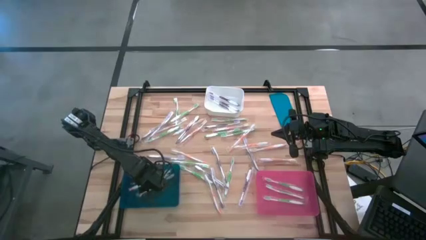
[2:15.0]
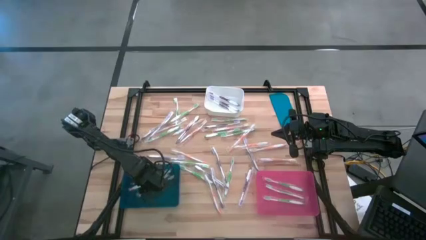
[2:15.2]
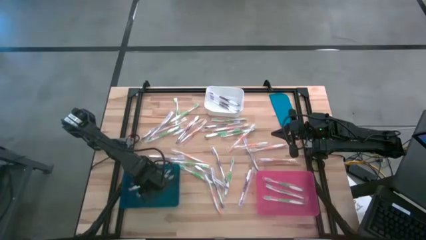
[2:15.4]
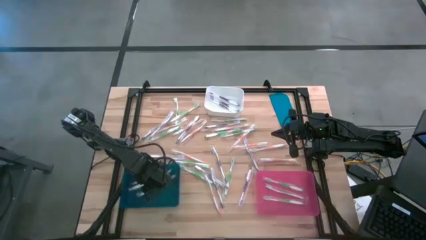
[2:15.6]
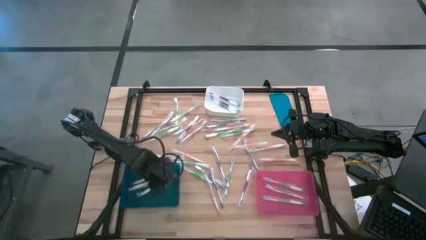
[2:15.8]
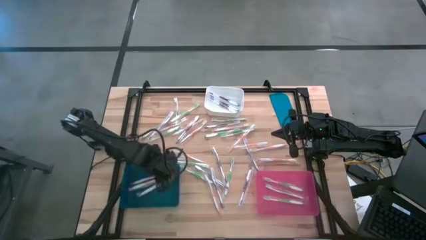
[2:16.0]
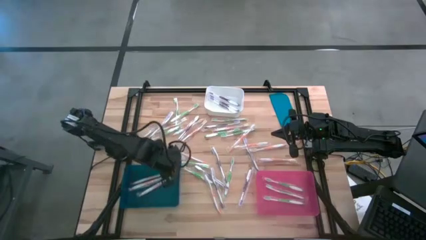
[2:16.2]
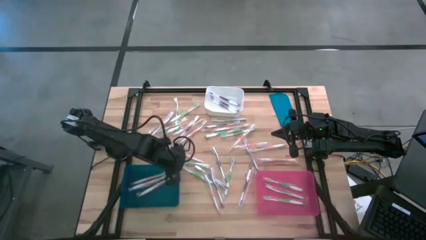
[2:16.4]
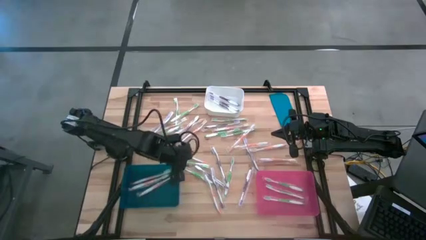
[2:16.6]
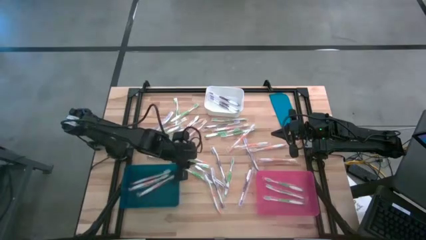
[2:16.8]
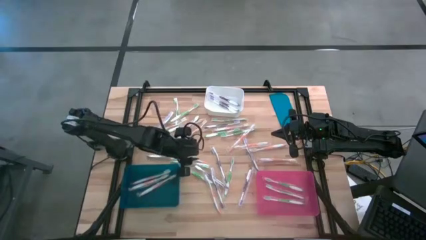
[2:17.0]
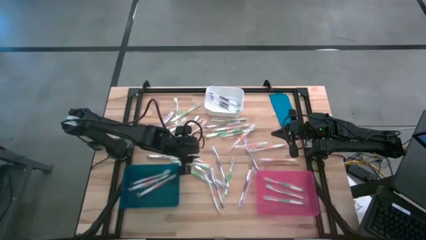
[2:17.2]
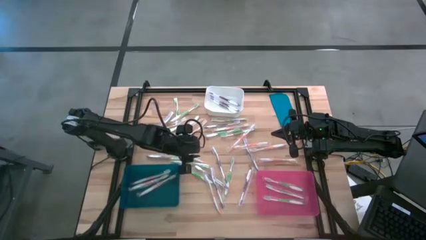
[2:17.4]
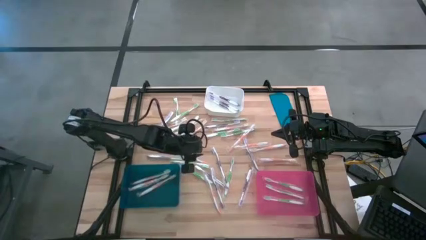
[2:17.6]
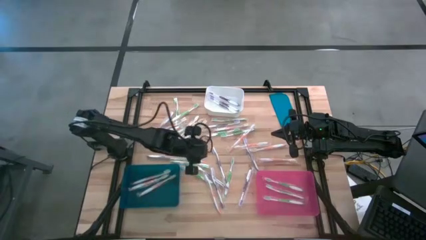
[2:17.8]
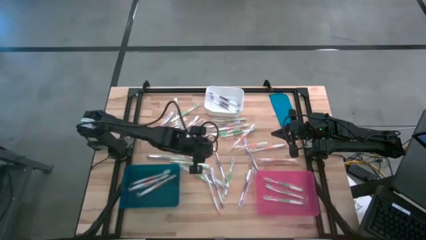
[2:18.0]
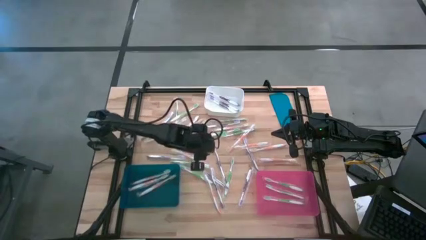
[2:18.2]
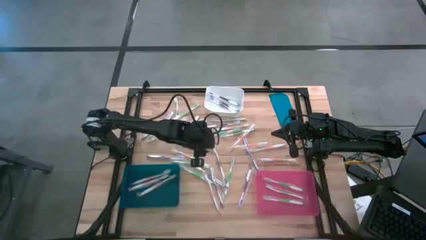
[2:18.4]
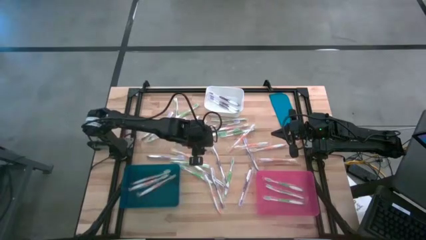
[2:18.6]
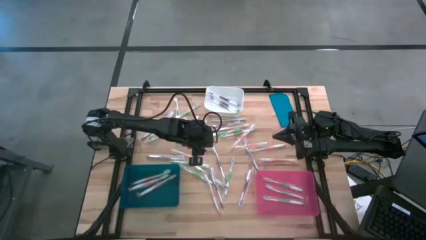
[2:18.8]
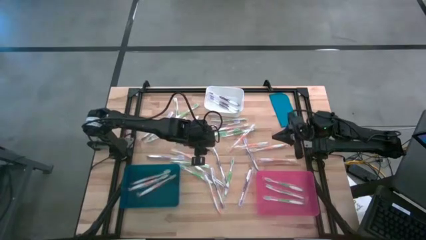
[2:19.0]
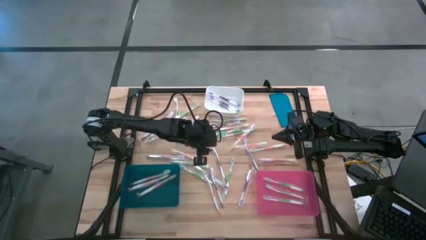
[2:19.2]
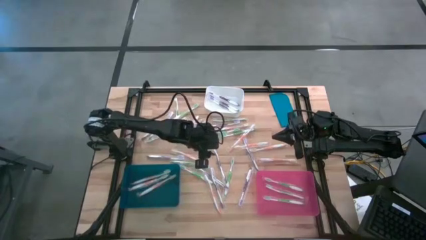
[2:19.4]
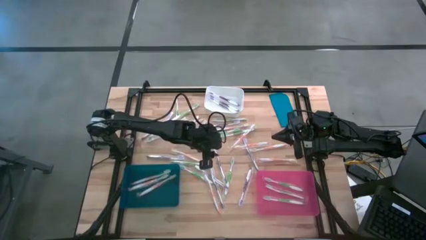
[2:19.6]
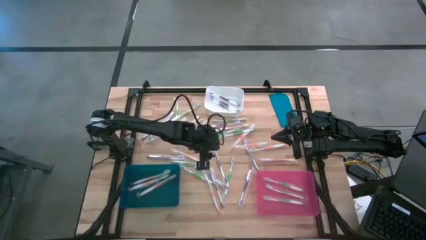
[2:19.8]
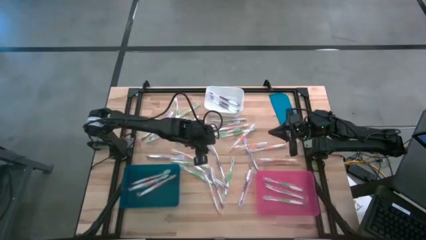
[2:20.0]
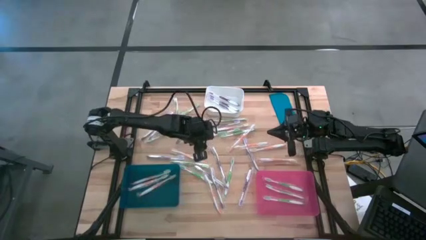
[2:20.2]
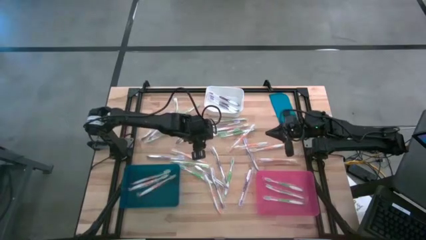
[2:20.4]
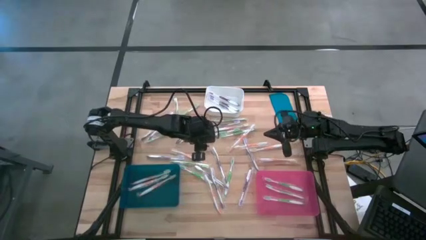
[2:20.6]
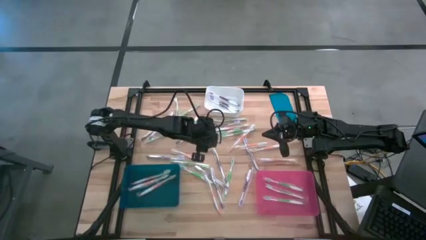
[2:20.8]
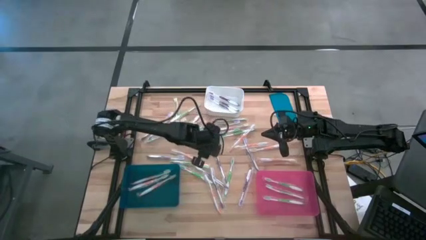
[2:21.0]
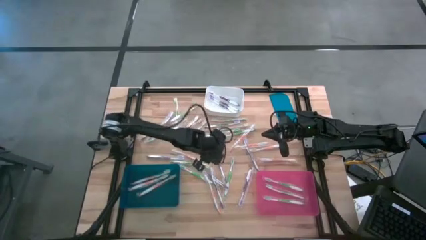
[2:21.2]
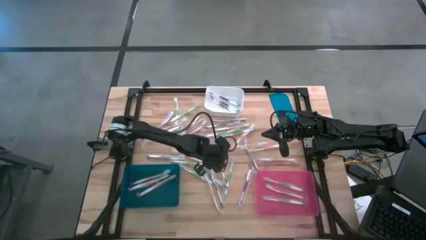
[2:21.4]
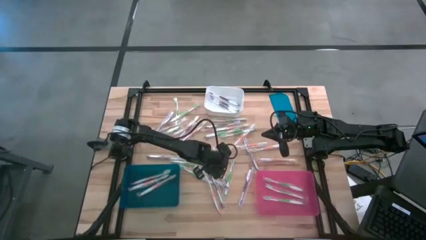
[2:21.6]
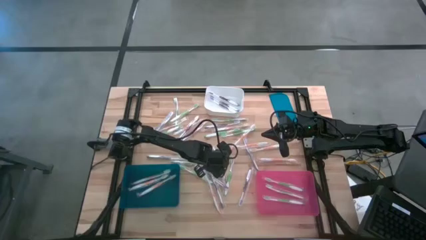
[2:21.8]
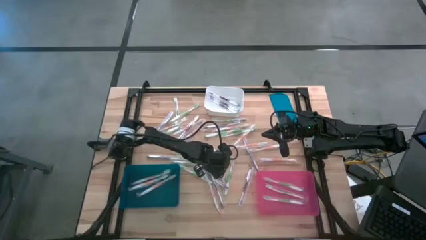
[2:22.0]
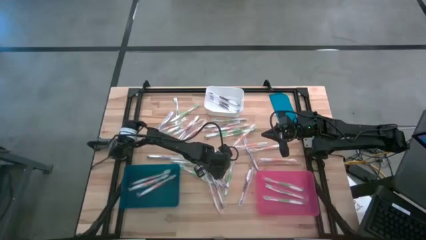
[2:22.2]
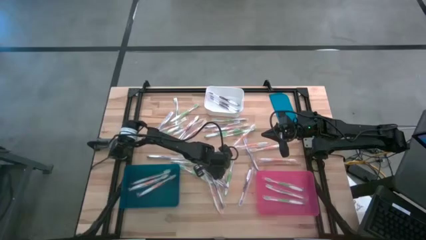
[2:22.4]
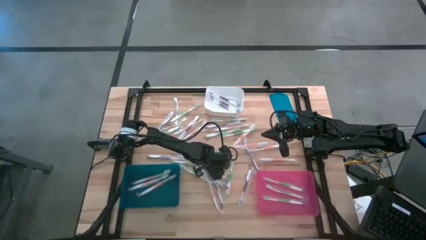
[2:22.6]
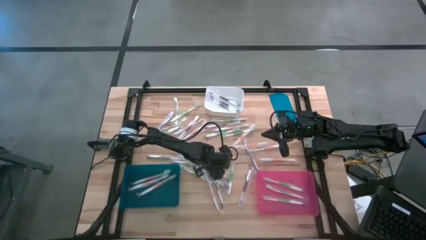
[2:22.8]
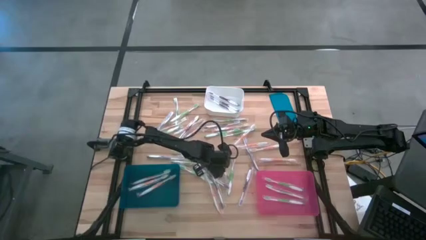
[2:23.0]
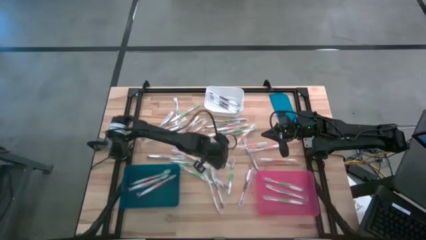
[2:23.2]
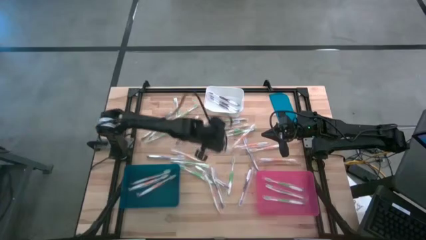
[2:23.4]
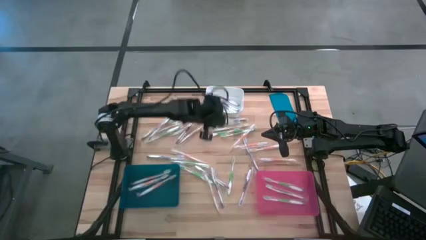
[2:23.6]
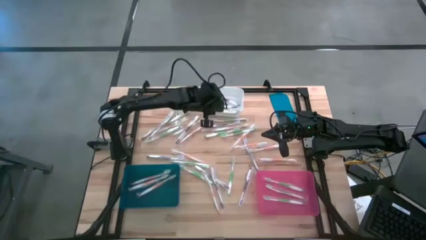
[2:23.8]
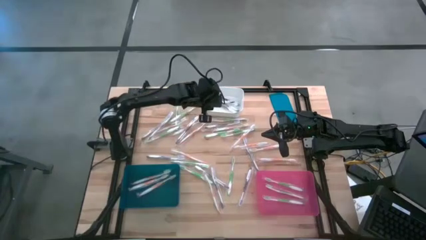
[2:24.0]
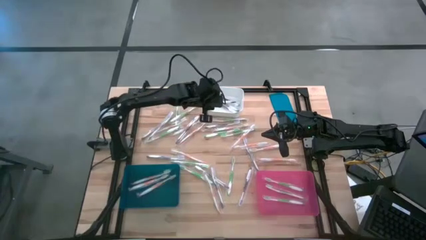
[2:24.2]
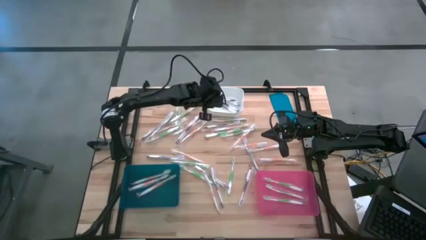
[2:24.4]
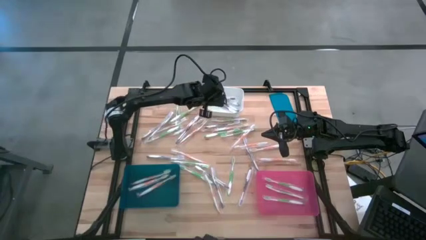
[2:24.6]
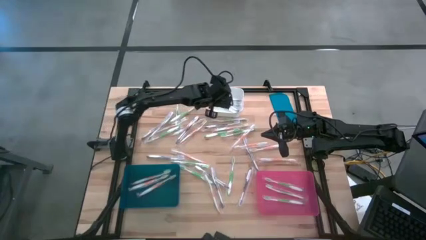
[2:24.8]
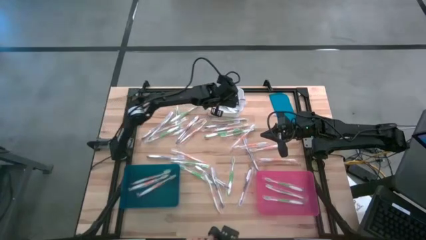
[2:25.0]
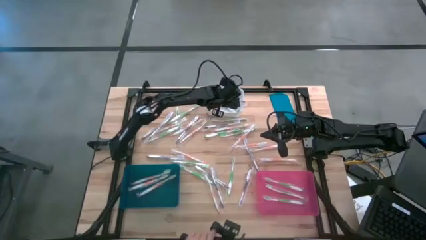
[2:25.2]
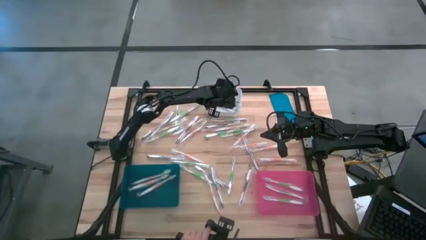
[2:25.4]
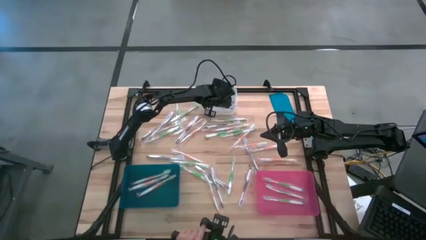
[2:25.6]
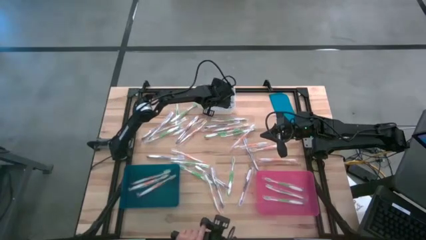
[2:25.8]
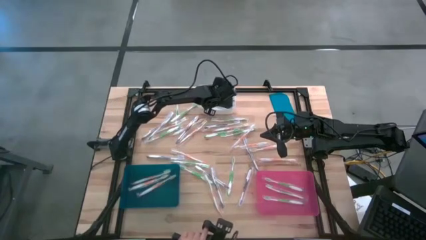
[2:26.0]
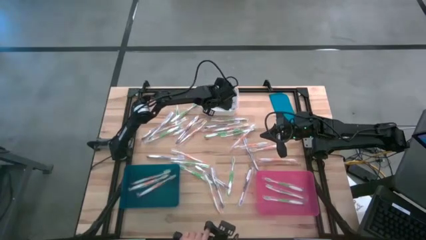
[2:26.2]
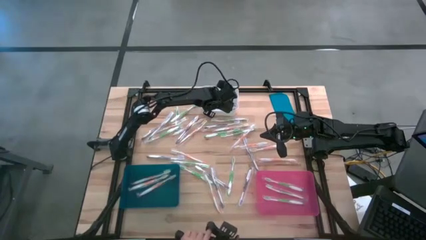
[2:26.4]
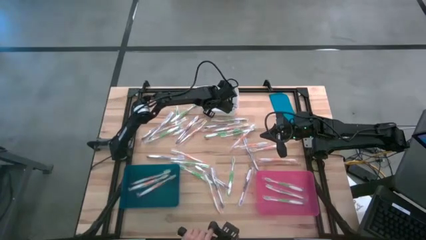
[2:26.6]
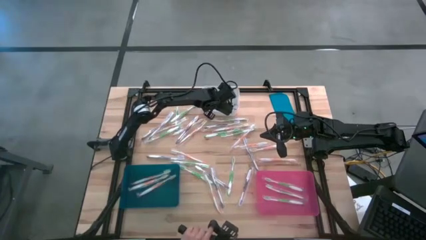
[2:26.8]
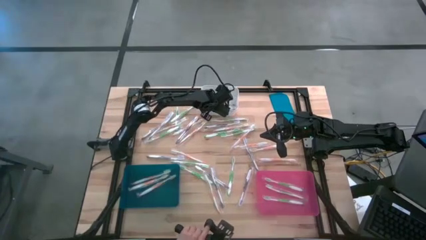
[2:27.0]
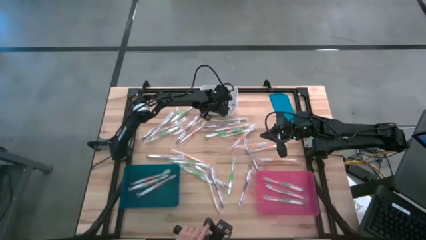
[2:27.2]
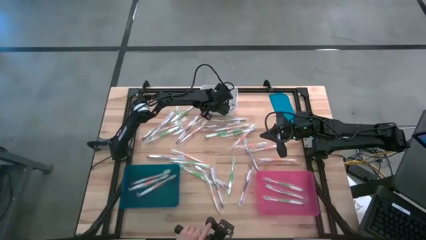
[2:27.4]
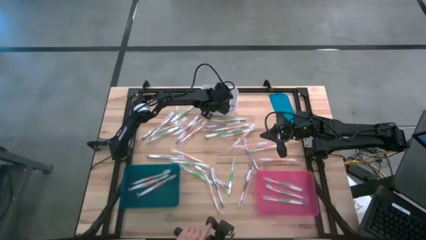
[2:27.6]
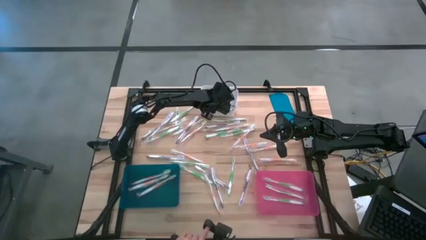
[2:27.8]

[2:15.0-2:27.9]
Task: Pick & Place Toothbrushes
Put the violet toothbrush into the white bin
